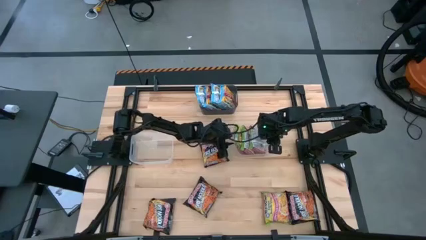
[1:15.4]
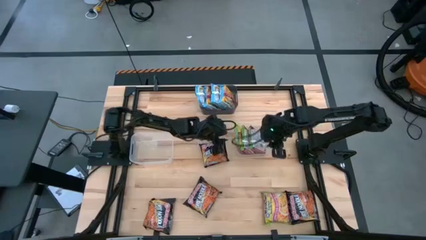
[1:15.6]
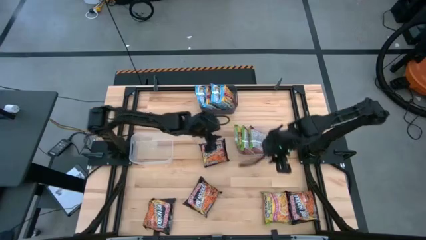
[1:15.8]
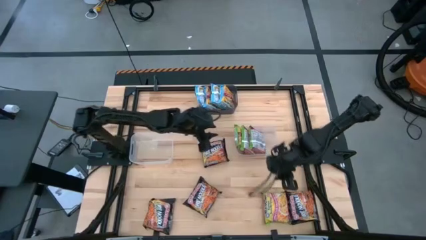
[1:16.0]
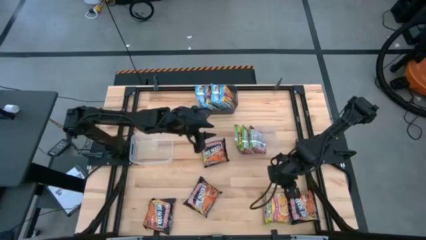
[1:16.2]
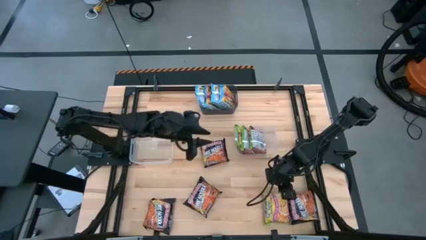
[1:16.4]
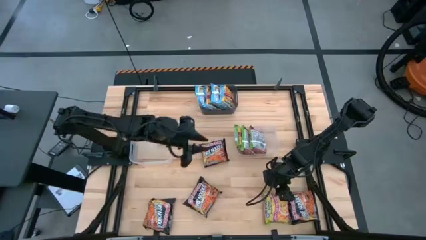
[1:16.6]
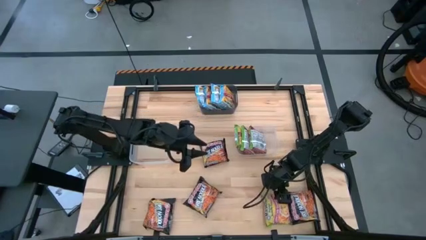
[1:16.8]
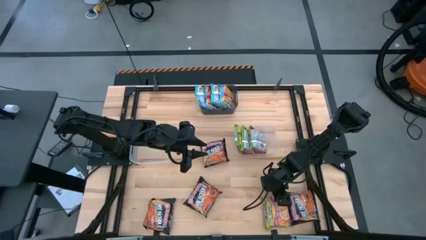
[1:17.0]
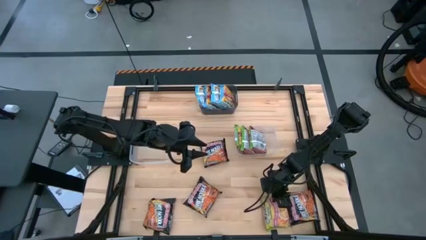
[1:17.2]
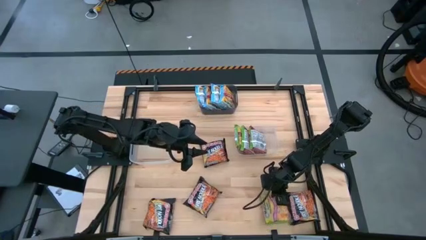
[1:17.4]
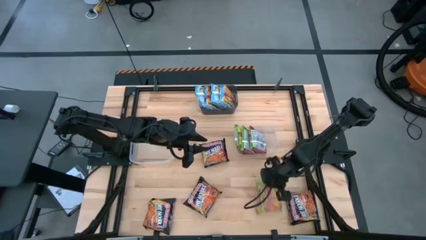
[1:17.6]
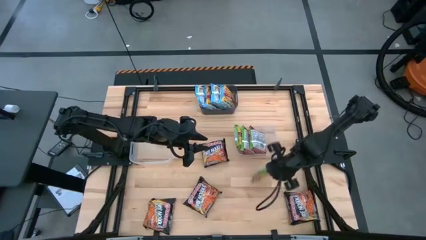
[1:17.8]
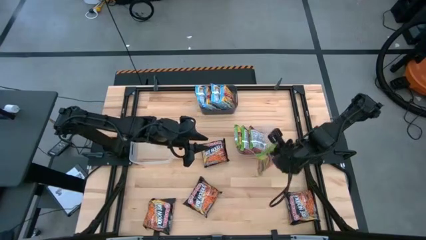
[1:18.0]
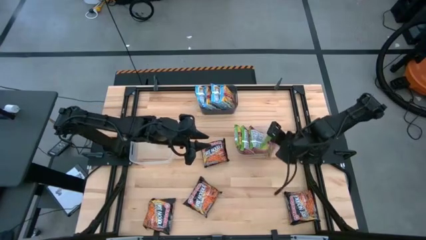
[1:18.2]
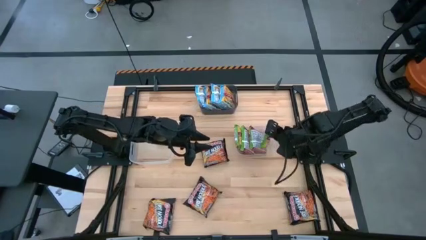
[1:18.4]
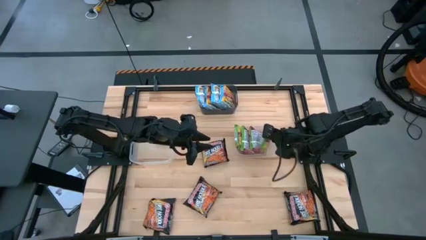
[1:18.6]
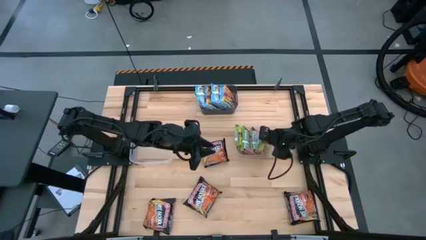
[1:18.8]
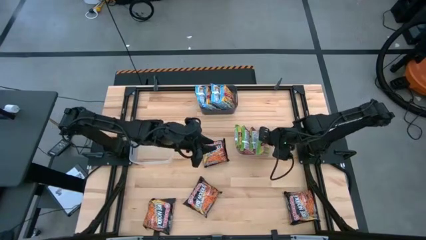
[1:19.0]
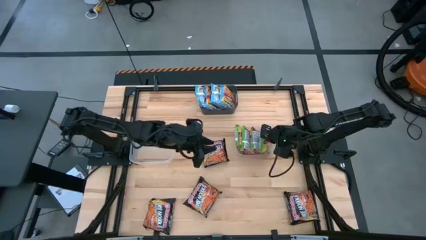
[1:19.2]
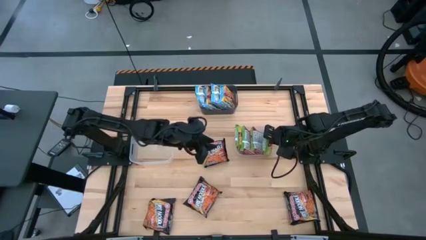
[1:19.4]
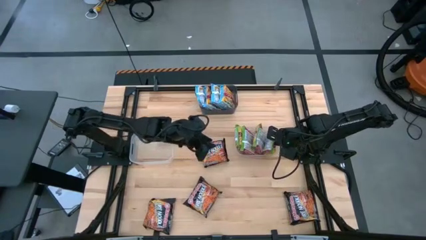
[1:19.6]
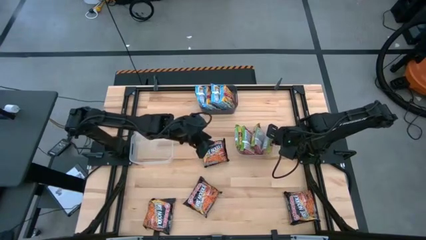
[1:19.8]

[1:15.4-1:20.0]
Task: Sort Maruchan noodles
Put the green noodle pack into the right transparent bin

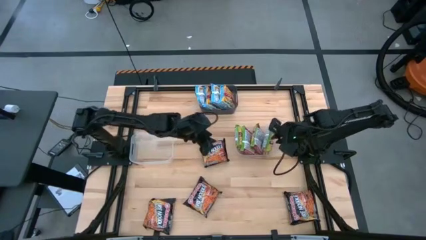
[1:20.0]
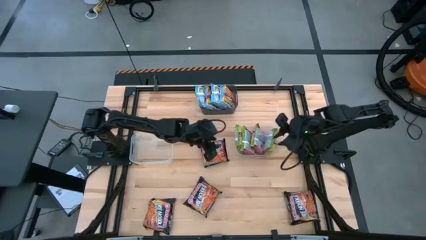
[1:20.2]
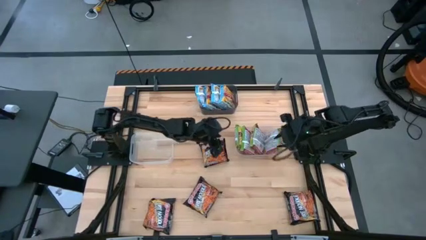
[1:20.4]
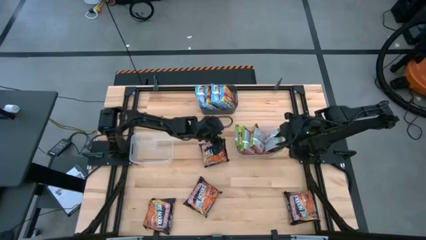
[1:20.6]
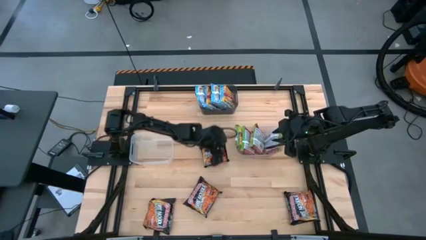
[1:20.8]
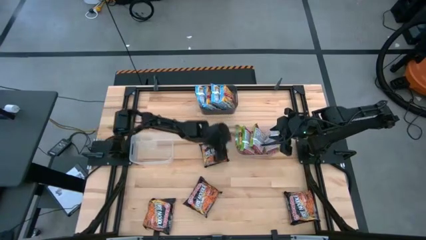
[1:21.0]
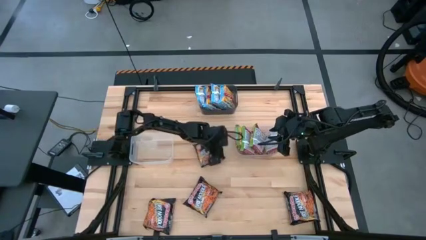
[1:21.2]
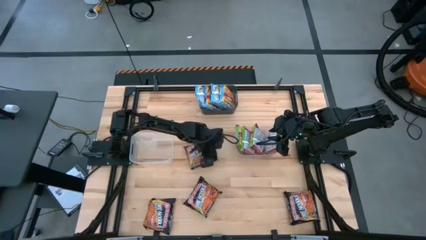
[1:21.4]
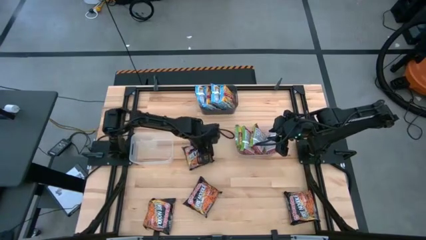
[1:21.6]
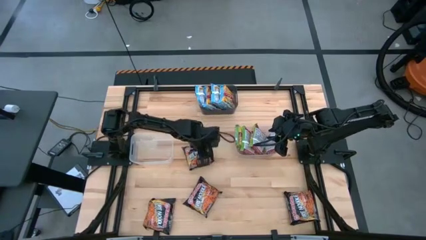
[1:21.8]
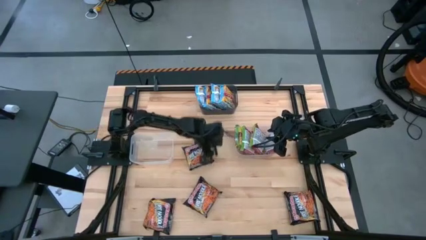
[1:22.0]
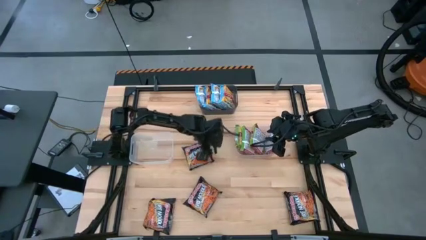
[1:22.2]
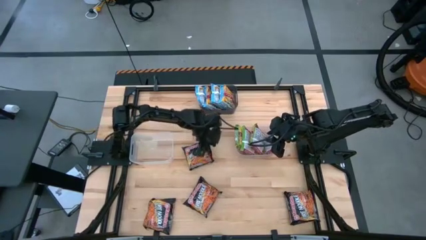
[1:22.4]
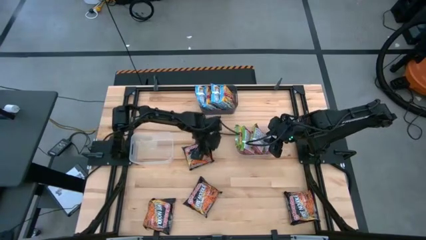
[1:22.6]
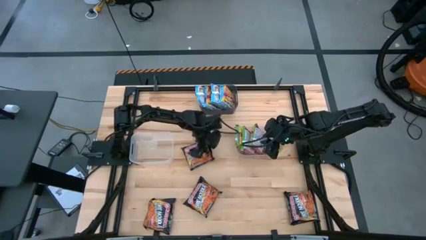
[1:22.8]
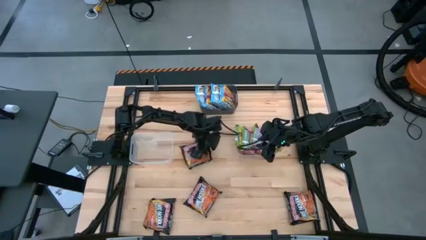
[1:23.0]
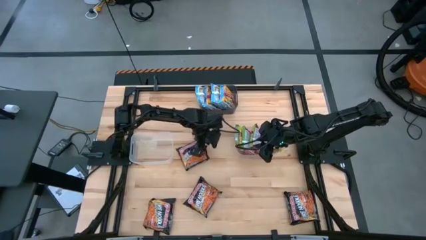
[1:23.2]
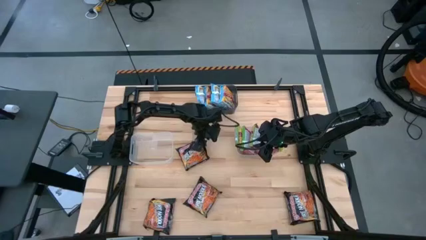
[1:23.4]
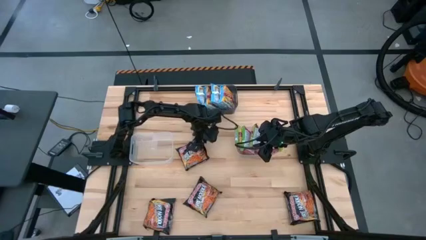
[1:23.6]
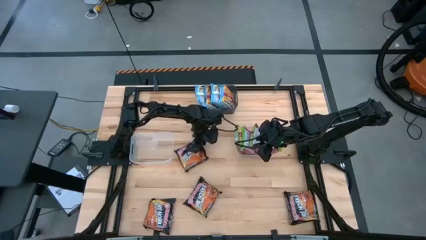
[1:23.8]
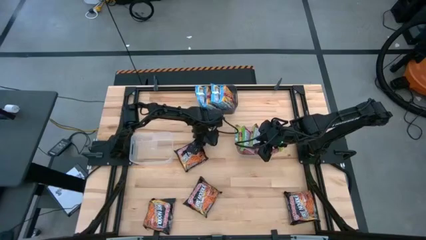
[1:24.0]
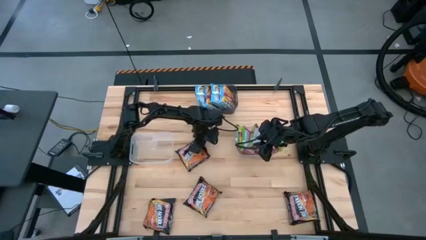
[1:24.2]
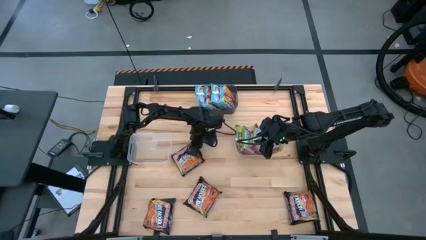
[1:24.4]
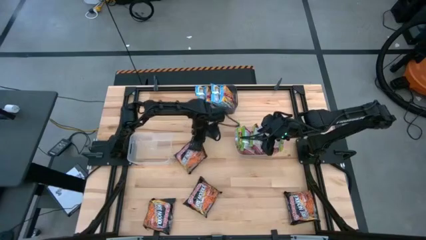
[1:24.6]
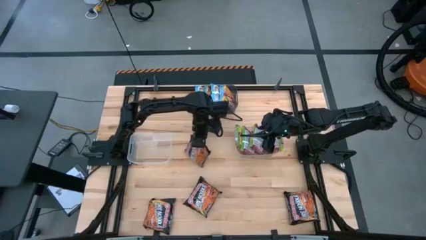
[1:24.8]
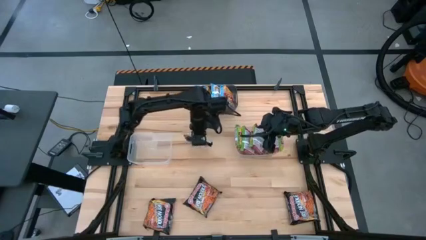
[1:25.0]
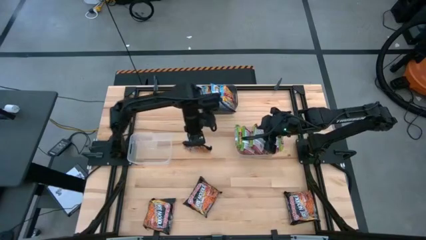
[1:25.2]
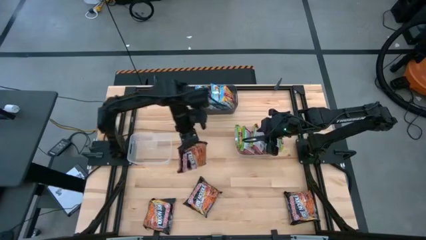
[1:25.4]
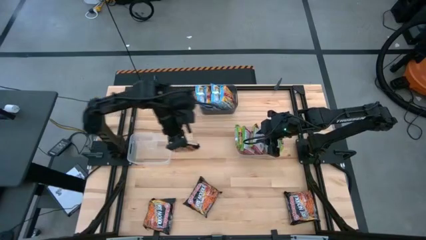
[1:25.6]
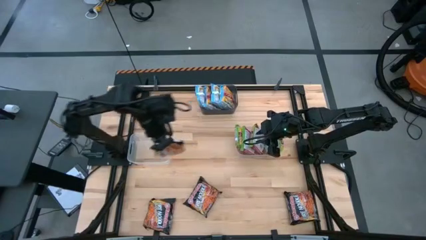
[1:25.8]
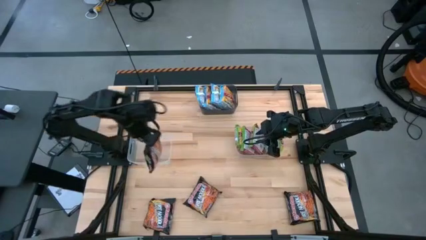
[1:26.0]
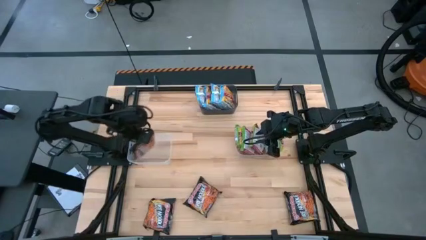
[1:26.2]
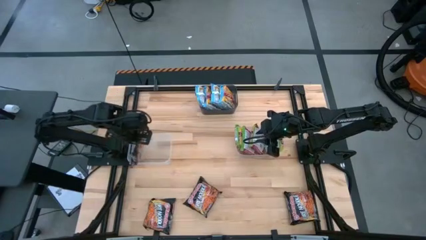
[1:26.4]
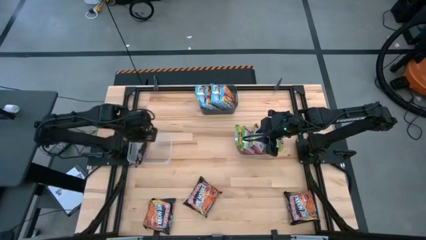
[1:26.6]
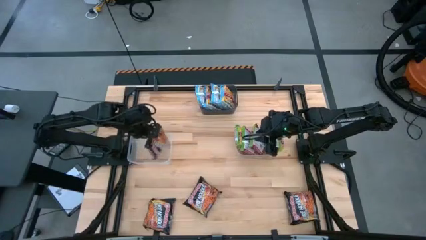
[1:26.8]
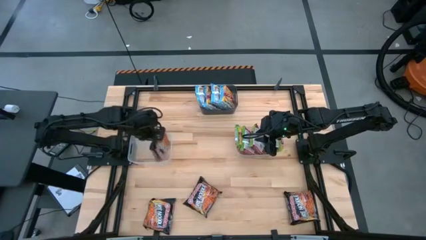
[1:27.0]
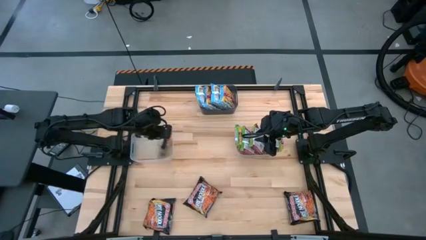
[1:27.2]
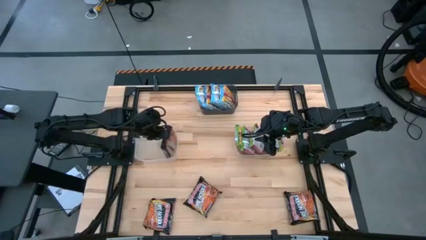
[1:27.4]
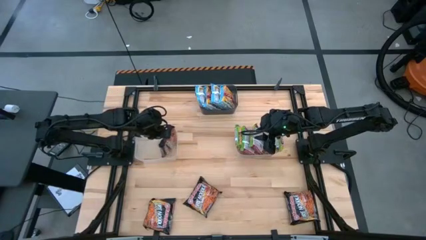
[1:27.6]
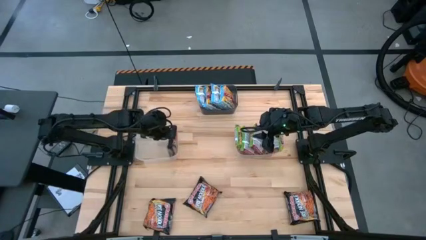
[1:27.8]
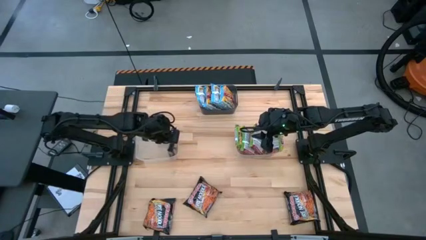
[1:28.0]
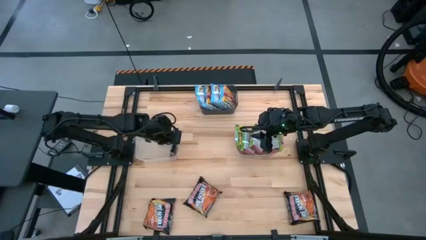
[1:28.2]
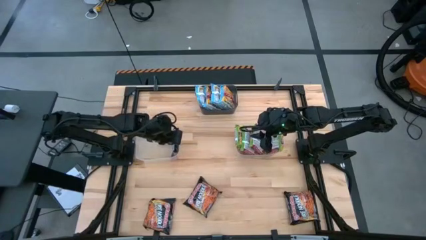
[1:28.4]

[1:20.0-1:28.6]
Put the black noodle pack into the left transparent bin

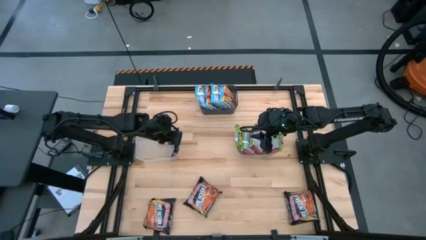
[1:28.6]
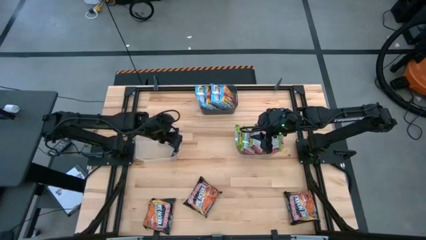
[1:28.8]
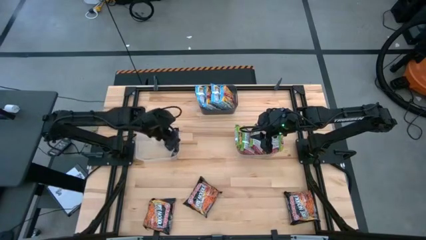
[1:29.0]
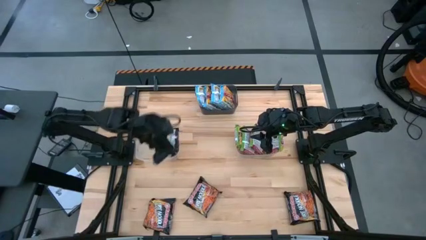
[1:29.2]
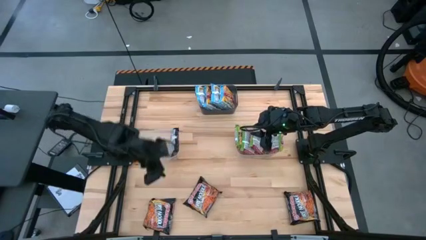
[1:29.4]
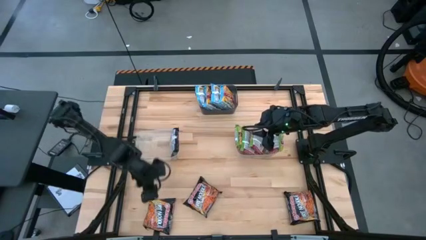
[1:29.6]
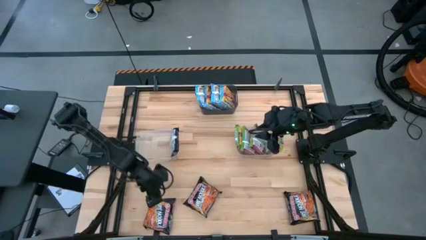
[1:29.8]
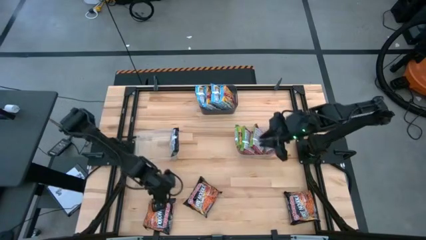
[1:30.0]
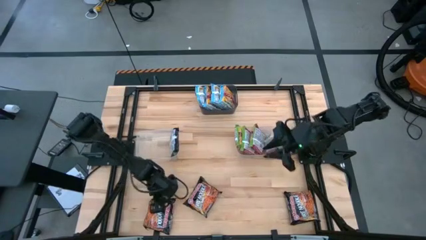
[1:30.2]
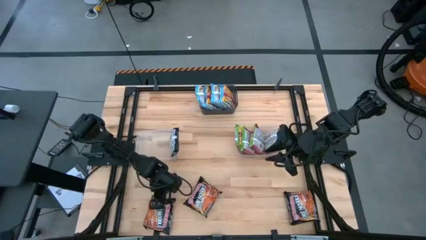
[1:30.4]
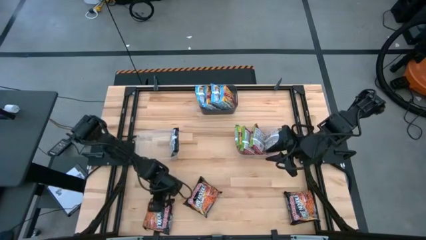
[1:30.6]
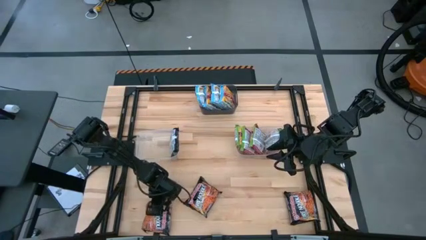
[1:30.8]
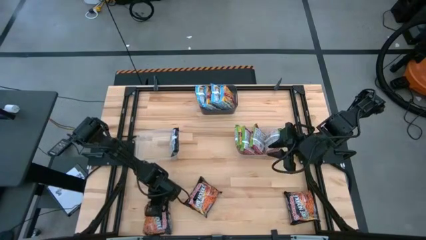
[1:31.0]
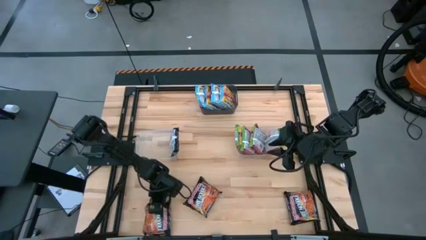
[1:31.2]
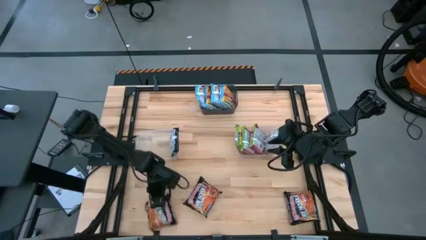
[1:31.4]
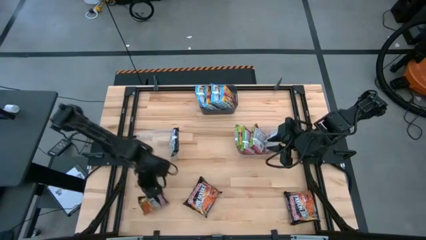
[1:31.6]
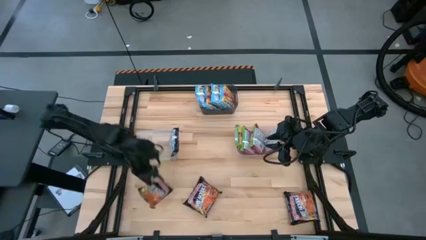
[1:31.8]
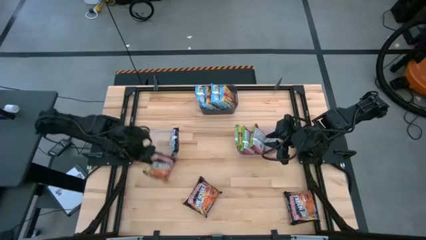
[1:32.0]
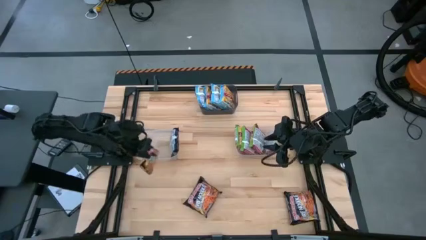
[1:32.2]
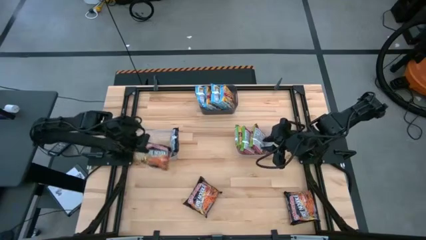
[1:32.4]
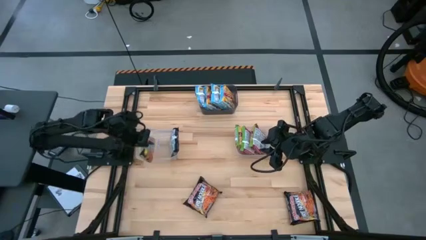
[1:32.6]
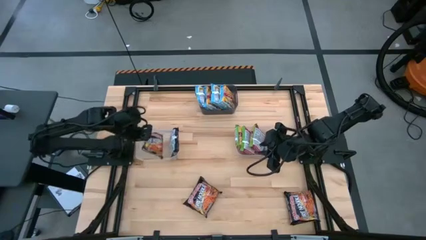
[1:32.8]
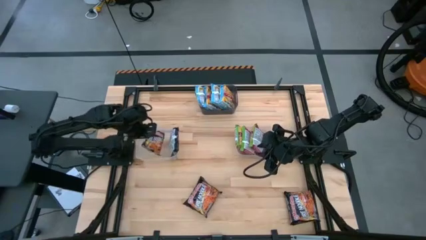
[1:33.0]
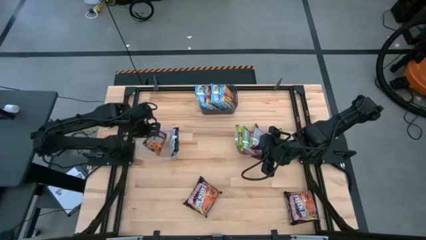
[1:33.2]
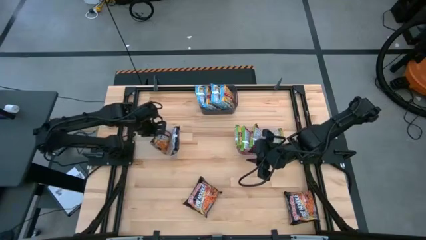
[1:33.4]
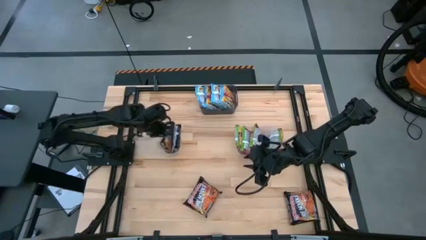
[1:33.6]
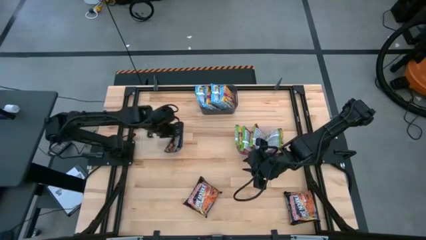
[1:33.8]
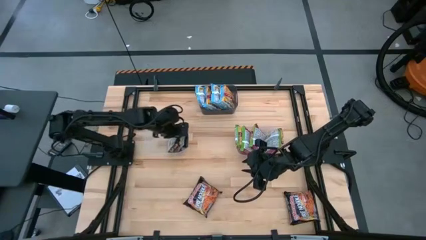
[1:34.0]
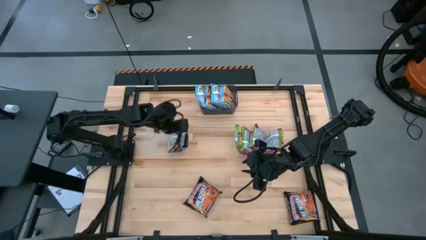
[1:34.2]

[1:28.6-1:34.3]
Put the black noodle pack into the left transparent bin
